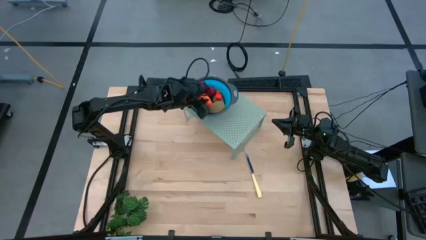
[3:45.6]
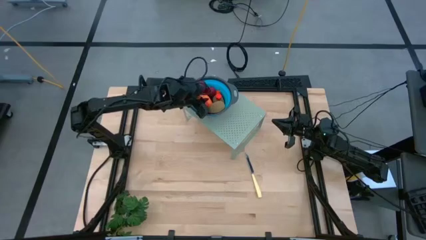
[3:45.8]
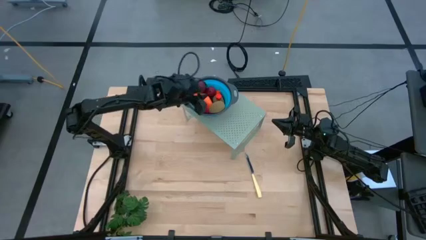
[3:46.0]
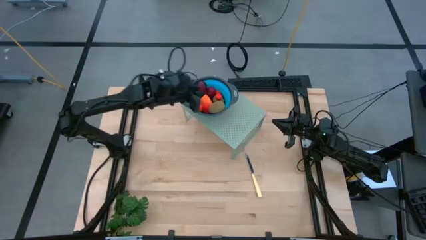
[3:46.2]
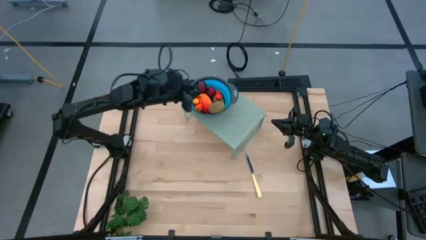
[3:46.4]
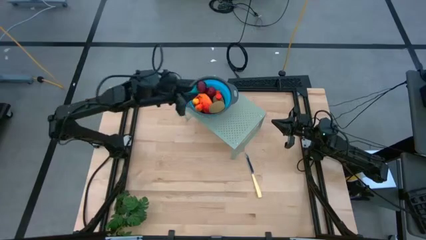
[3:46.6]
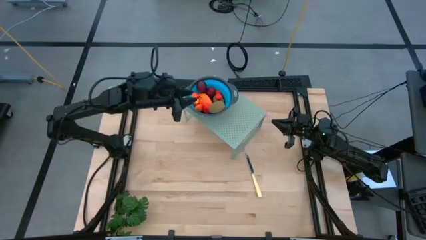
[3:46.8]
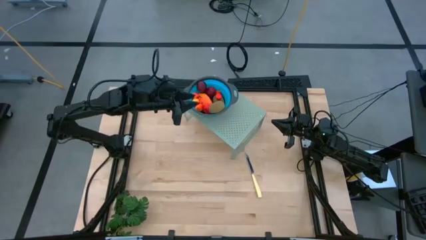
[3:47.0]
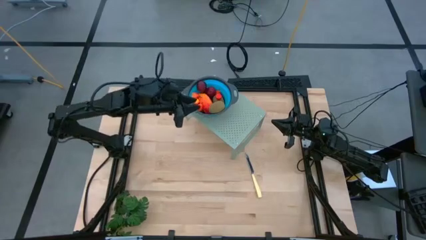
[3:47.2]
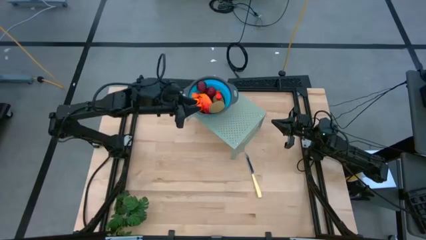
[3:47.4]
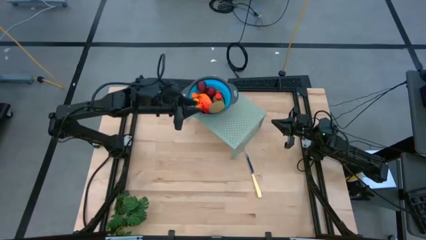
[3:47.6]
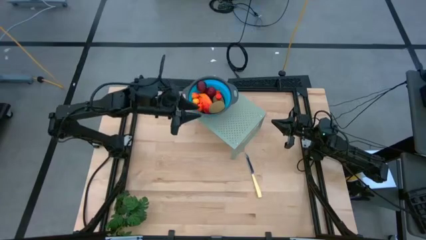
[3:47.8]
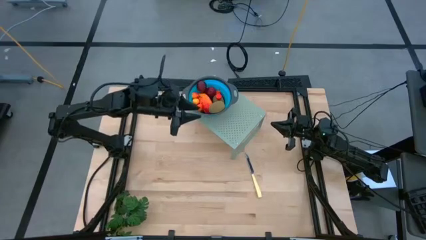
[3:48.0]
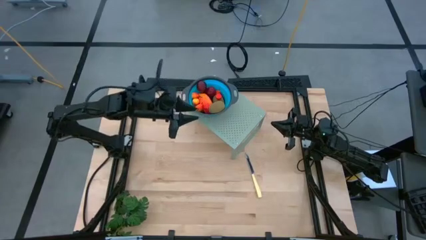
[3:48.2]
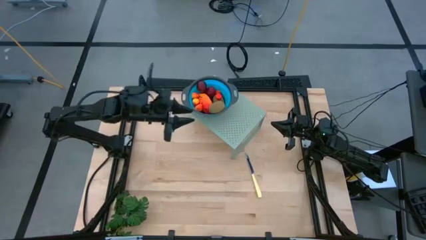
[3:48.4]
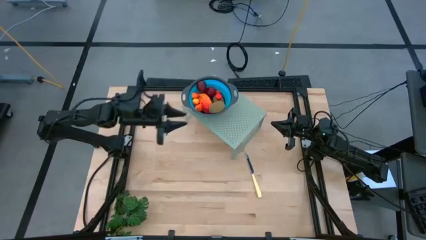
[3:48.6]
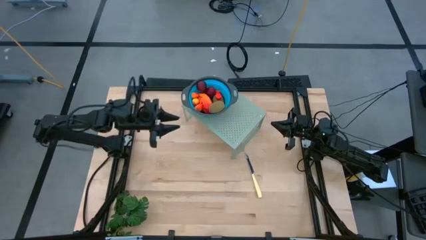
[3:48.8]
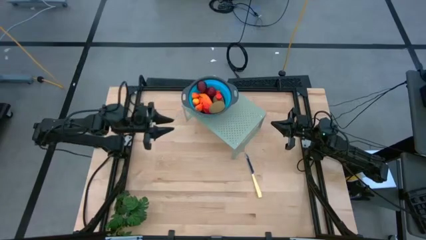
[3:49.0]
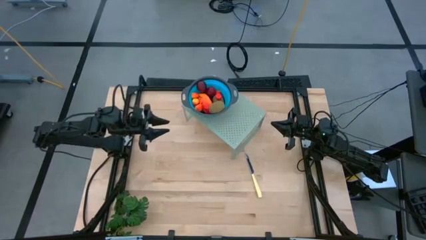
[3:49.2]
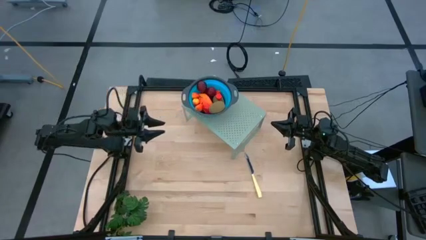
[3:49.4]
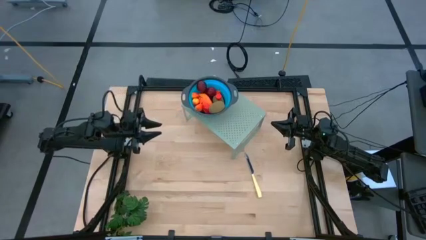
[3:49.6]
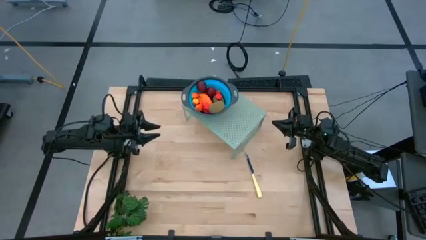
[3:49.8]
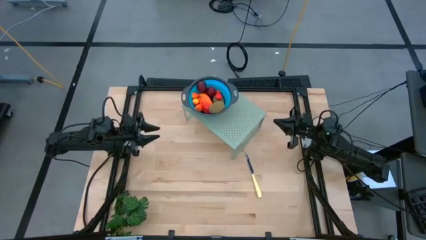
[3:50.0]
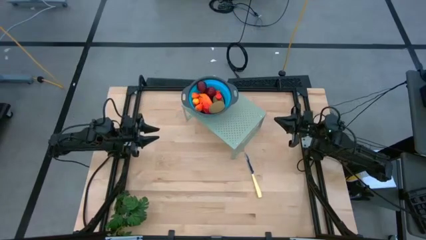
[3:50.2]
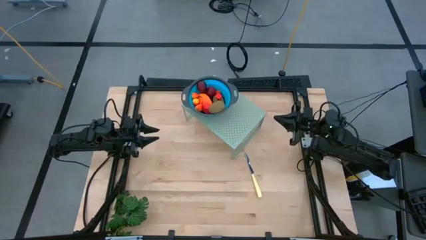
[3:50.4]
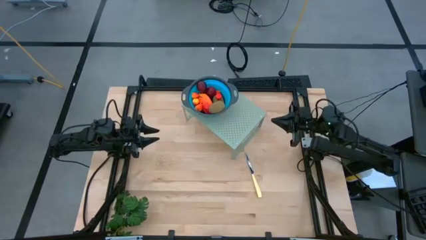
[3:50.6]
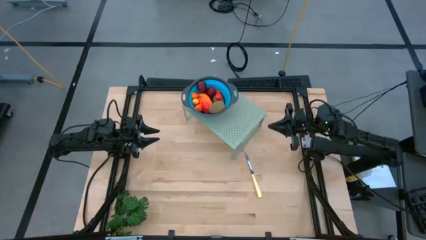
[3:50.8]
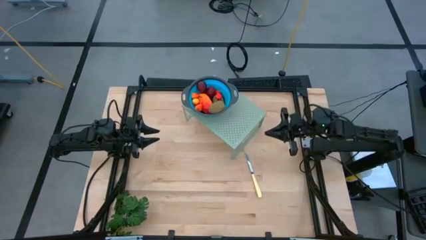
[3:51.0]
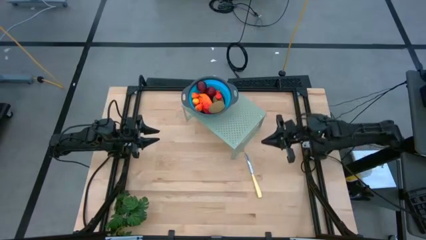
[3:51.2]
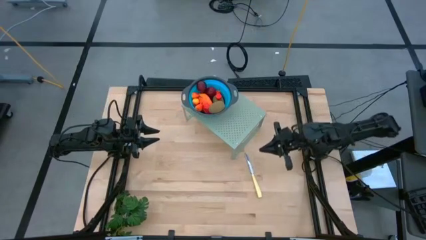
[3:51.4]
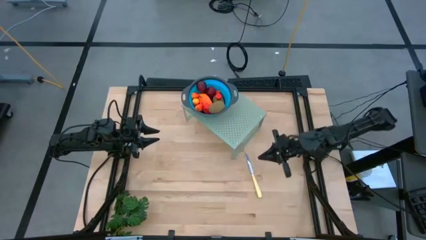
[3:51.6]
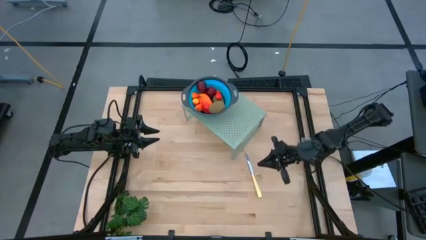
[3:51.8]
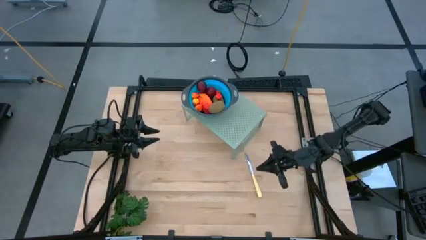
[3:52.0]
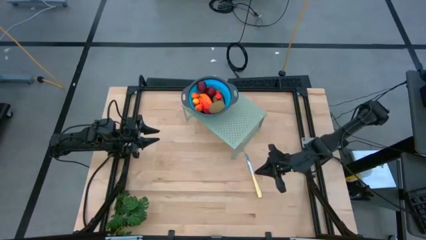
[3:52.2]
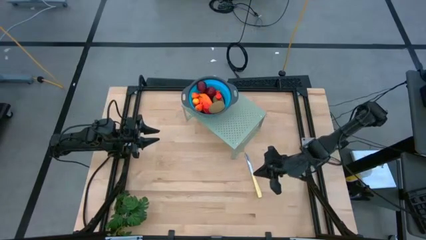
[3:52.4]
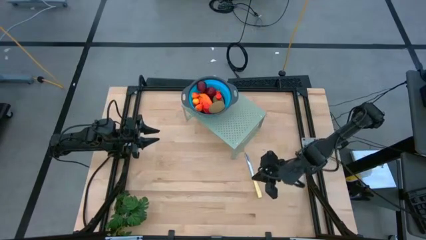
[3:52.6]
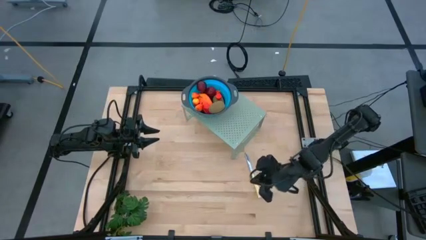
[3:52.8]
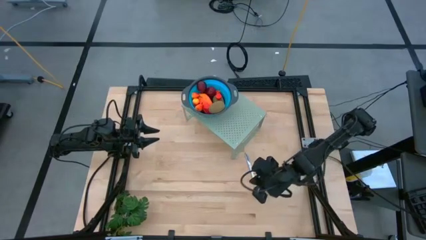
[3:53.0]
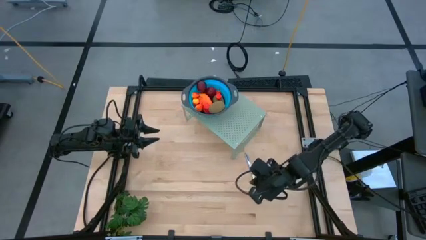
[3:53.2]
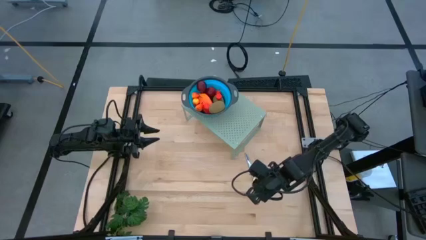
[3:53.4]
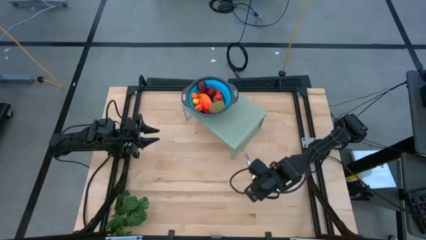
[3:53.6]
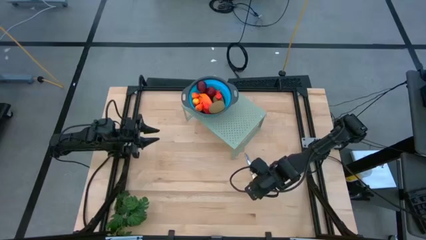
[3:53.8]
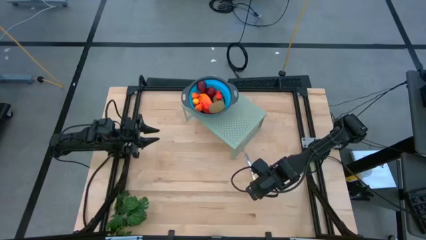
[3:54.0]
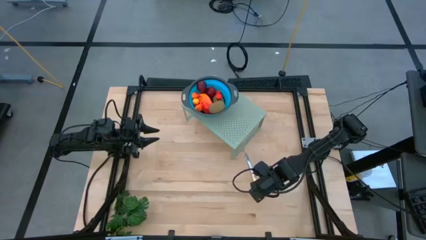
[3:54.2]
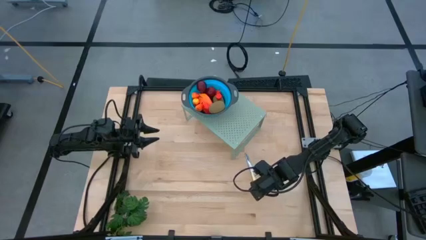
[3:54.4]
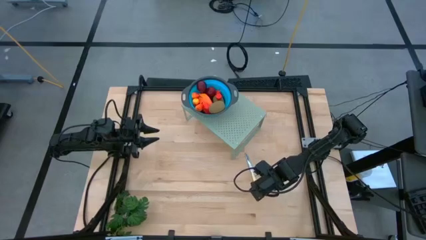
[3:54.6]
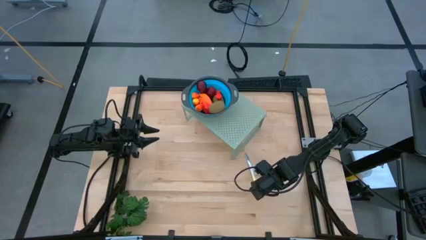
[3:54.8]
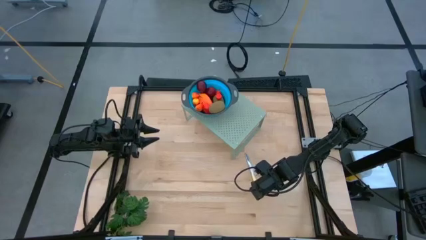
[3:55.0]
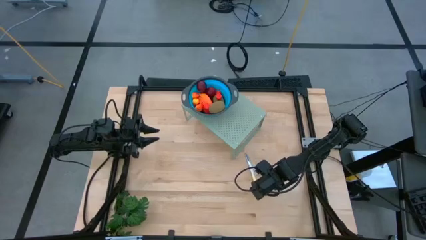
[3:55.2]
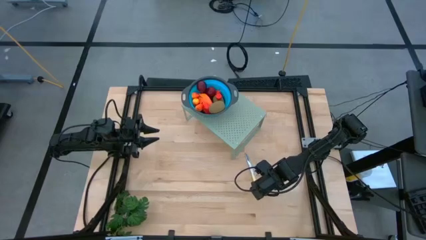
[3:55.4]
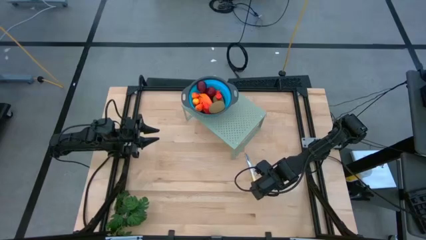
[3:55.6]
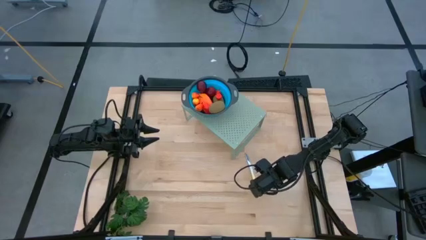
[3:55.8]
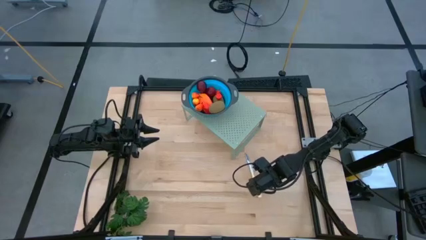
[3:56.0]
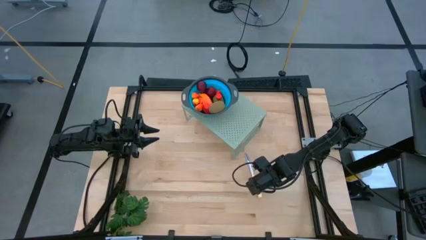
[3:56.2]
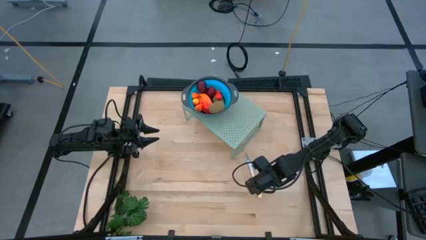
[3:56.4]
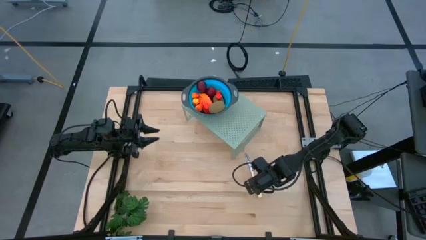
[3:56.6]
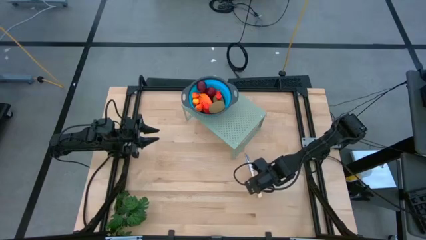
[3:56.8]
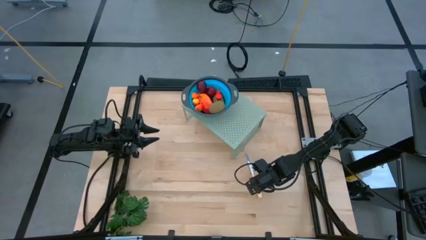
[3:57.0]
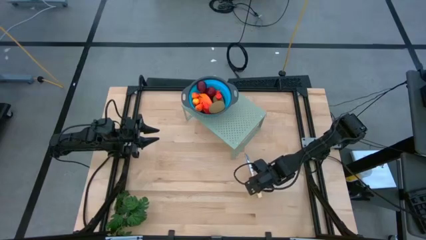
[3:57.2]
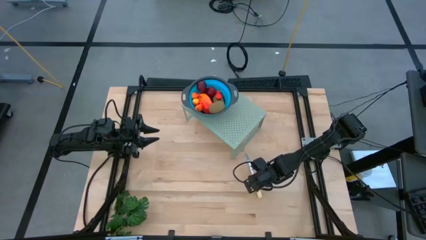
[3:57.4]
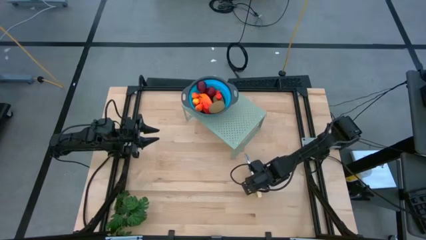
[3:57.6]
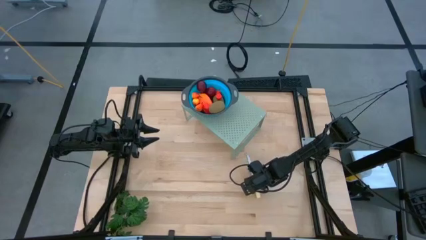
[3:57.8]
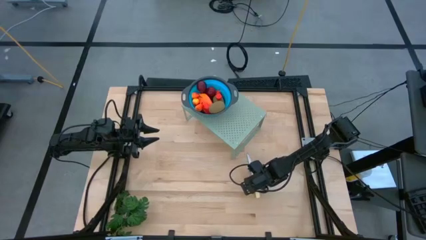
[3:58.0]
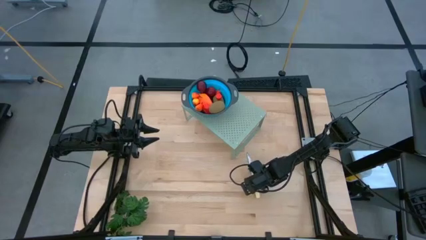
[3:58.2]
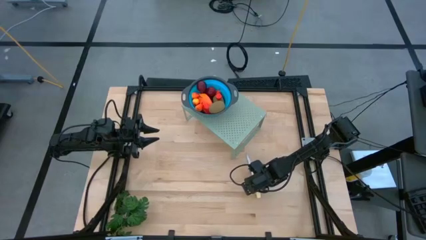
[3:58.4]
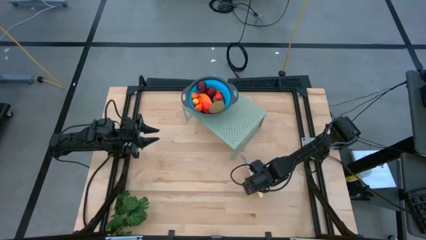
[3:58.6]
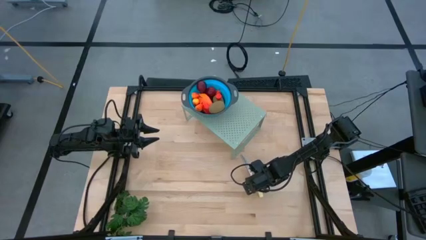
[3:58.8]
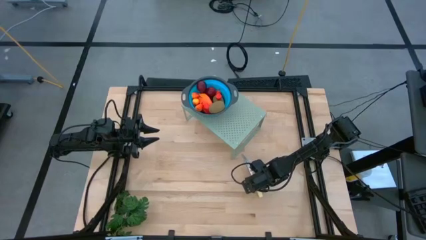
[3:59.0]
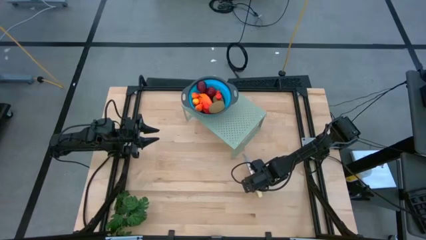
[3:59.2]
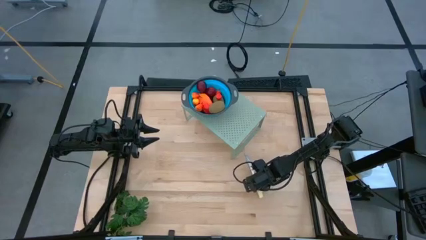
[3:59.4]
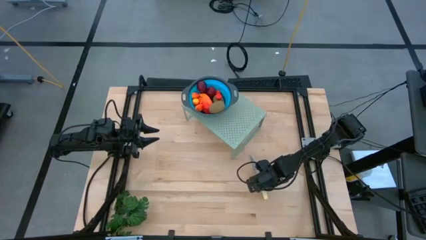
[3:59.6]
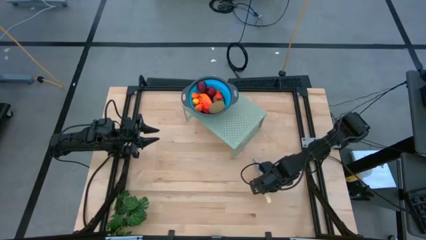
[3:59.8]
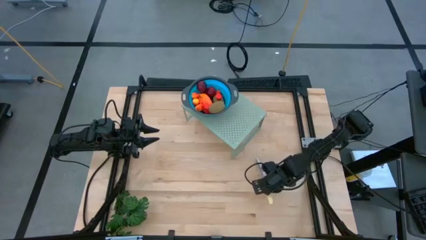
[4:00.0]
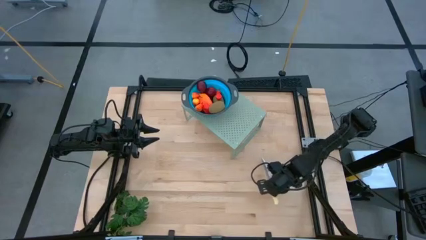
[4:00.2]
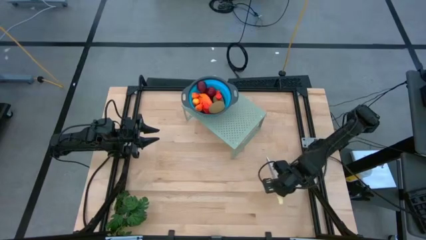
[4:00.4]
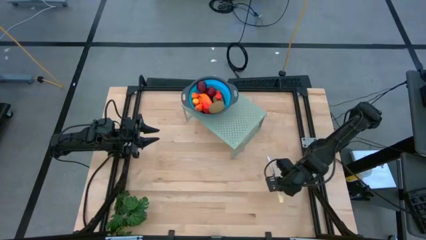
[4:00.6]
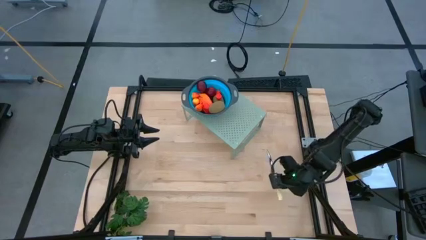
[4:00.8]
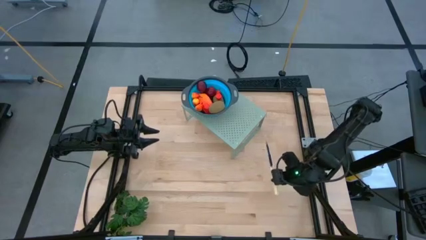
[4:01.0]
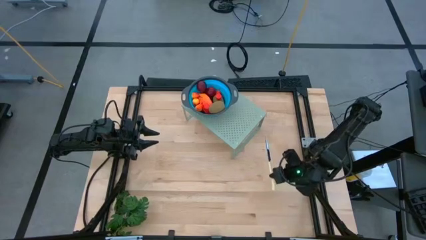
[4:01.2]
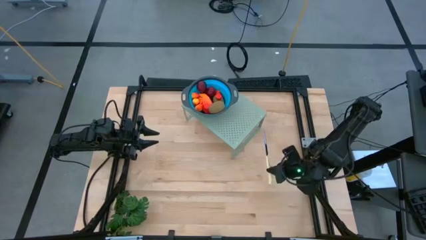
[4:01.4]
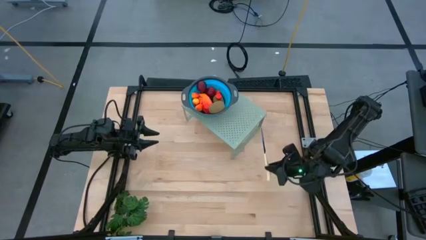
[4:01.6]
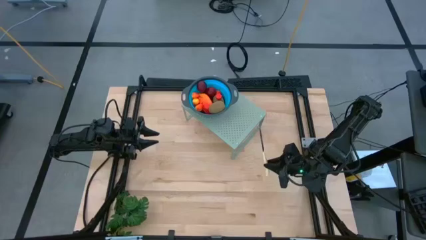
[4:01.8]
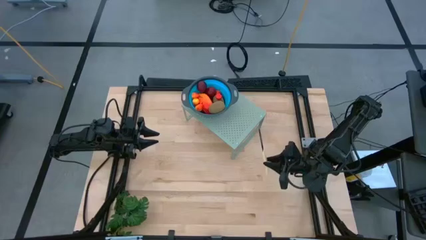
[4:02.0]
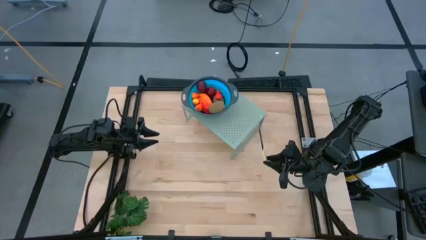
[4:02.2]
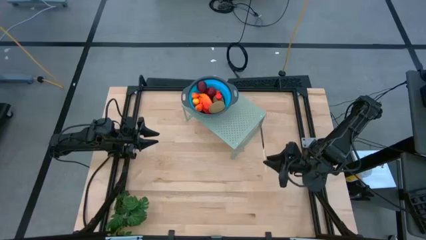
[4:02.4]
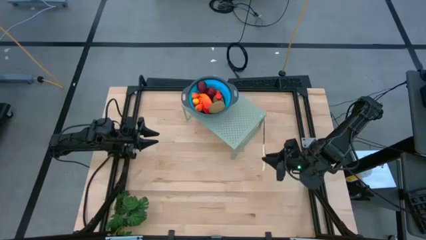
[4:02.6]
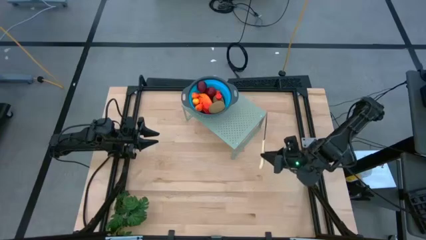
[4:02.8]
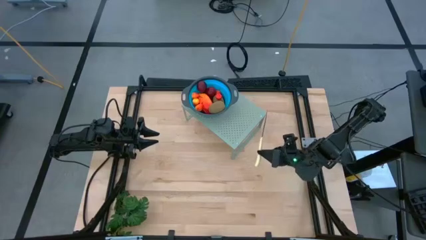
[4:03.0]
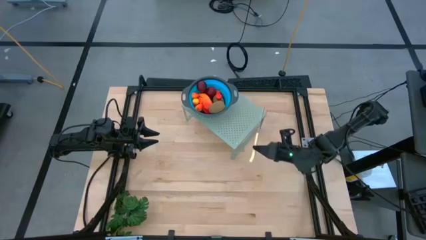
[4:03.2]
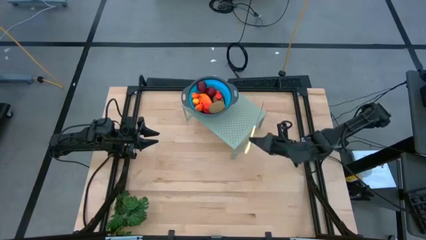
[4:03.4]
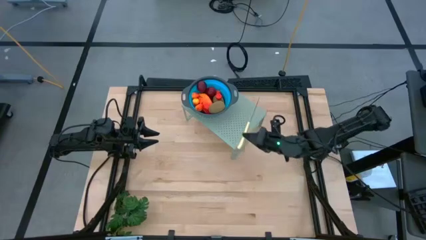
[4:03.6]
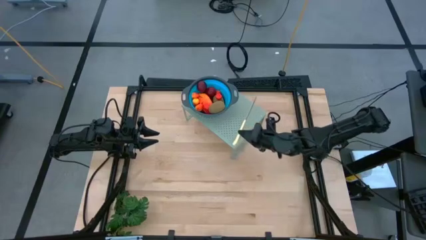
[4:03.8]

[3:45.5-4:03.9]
Task: Pick & Place Fruit
Put the knife on the shelf
